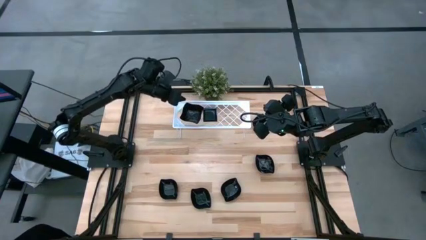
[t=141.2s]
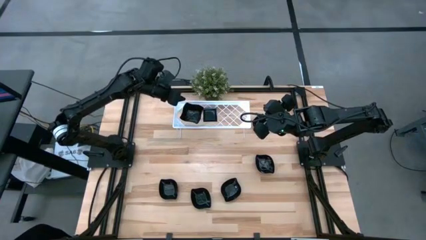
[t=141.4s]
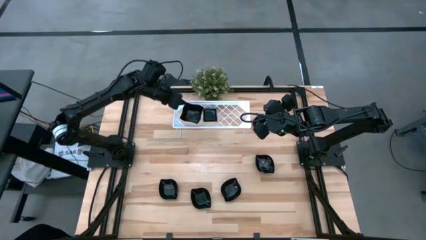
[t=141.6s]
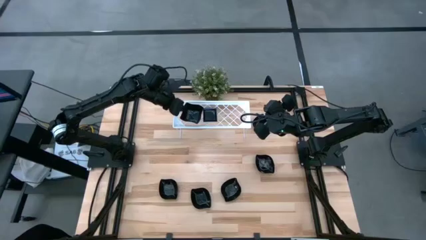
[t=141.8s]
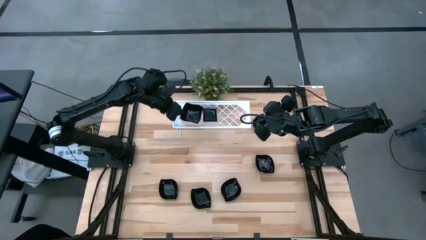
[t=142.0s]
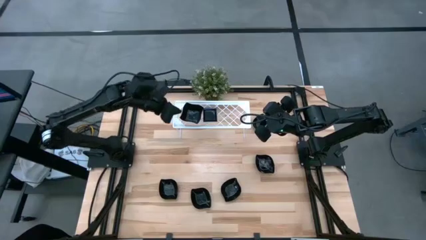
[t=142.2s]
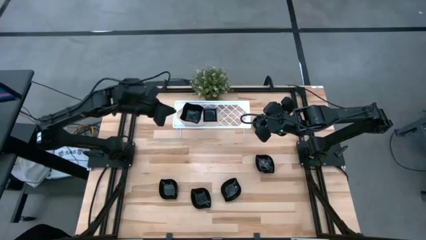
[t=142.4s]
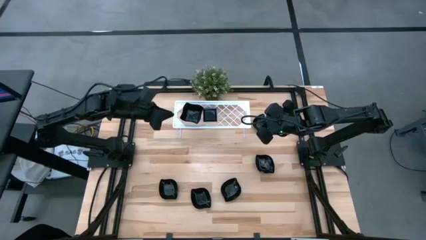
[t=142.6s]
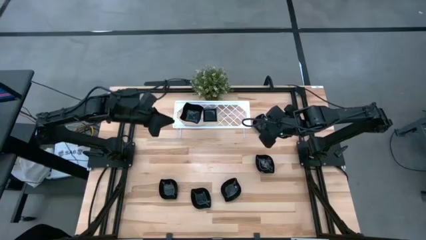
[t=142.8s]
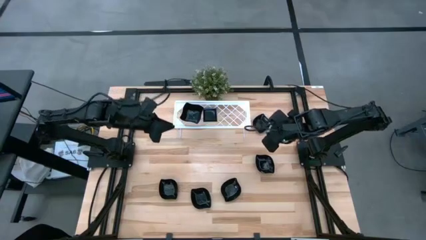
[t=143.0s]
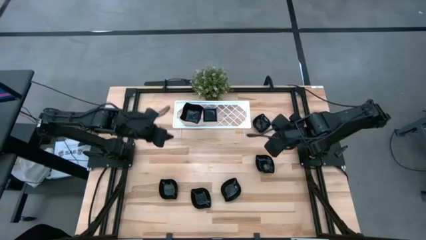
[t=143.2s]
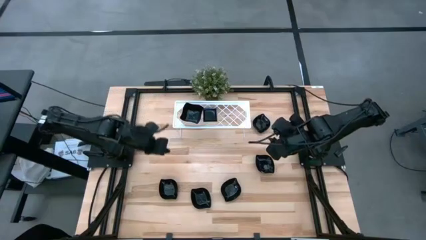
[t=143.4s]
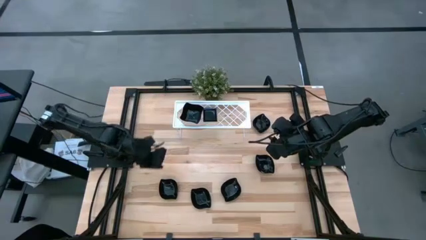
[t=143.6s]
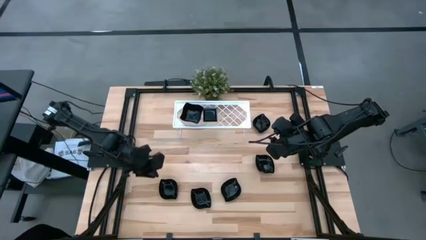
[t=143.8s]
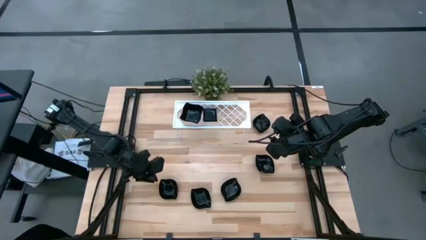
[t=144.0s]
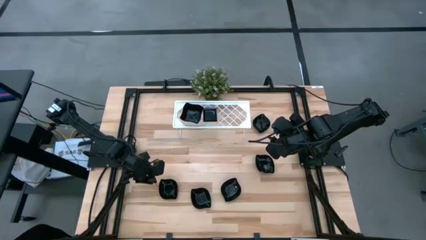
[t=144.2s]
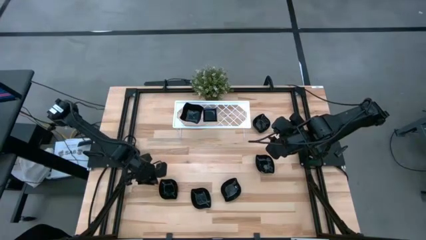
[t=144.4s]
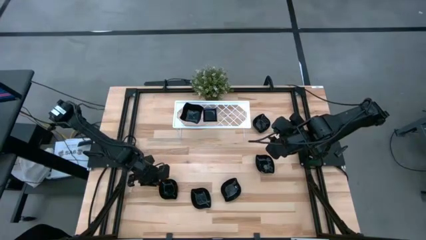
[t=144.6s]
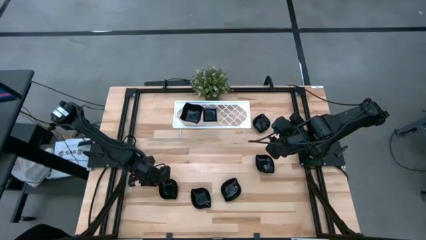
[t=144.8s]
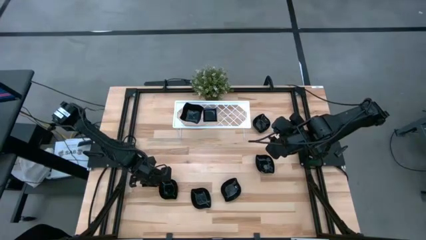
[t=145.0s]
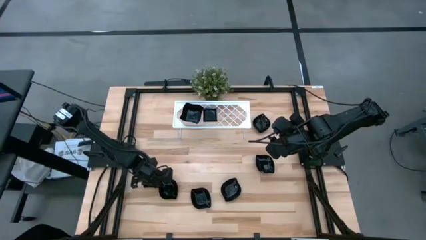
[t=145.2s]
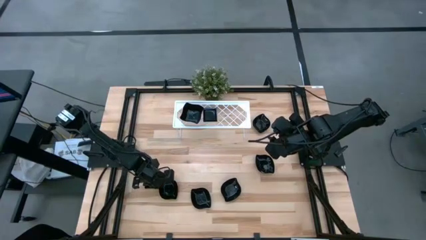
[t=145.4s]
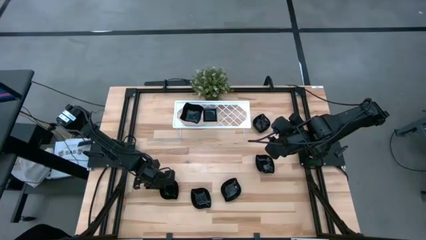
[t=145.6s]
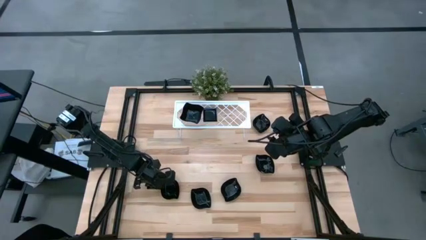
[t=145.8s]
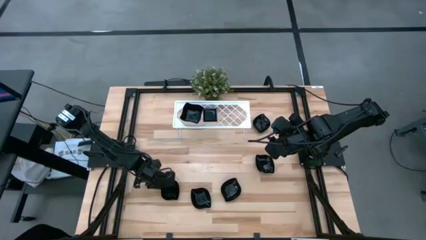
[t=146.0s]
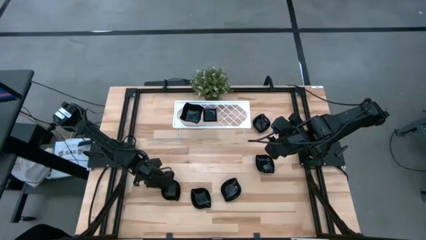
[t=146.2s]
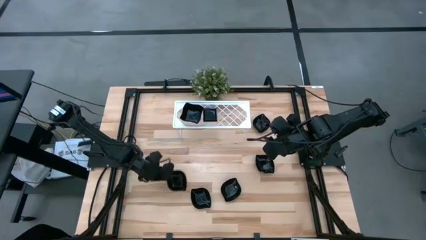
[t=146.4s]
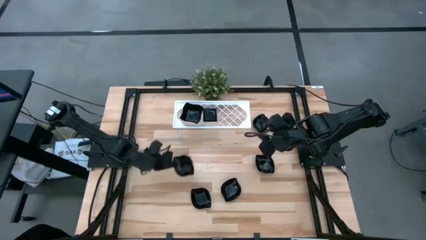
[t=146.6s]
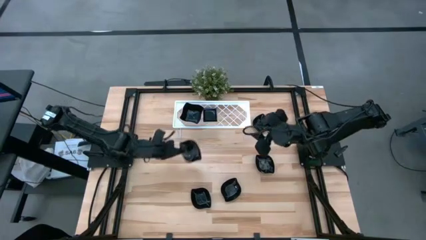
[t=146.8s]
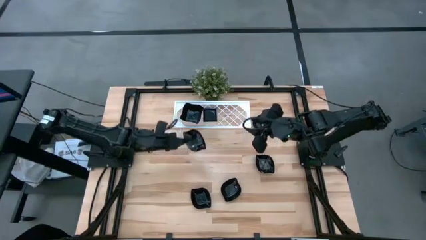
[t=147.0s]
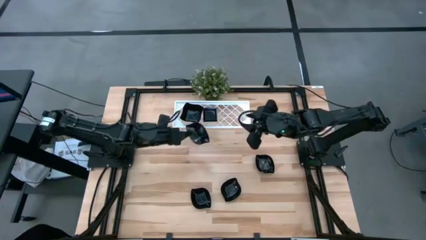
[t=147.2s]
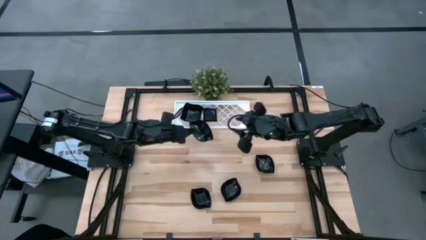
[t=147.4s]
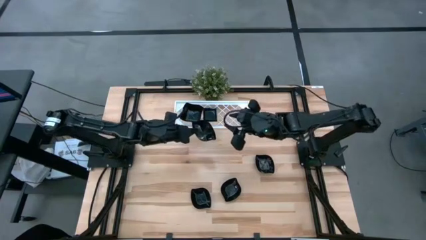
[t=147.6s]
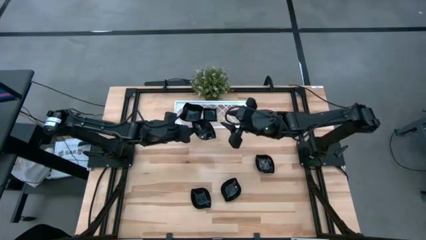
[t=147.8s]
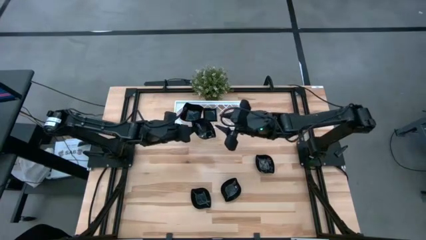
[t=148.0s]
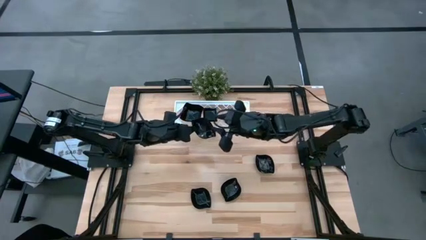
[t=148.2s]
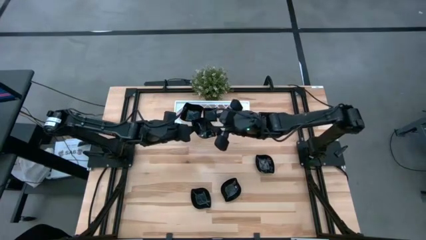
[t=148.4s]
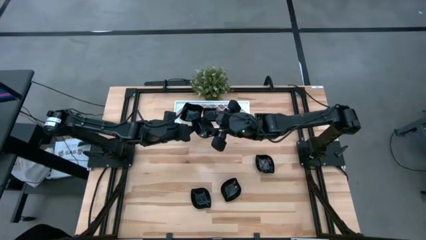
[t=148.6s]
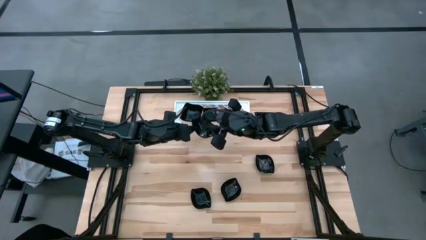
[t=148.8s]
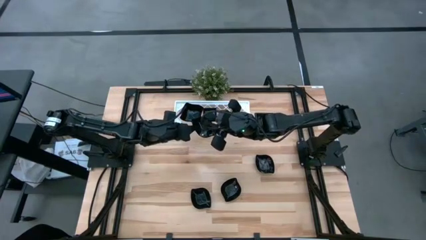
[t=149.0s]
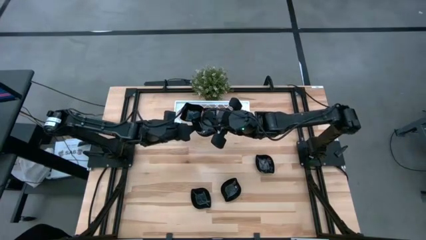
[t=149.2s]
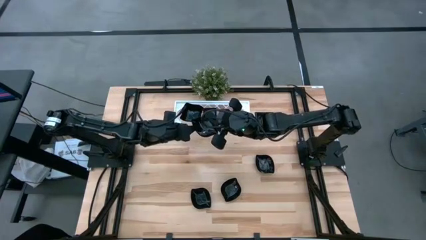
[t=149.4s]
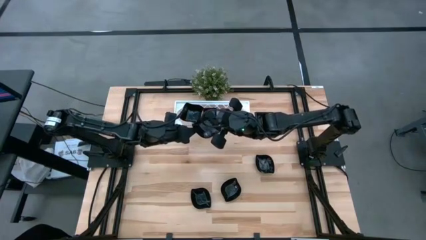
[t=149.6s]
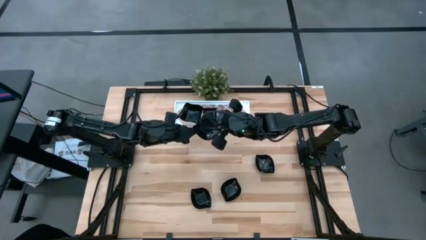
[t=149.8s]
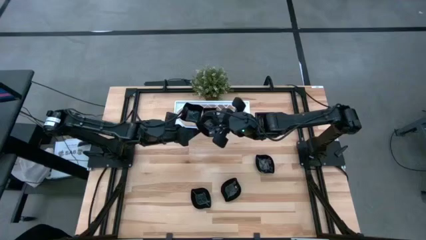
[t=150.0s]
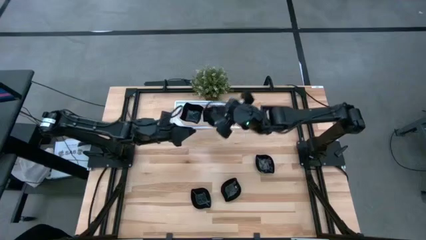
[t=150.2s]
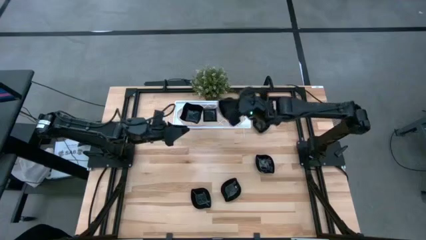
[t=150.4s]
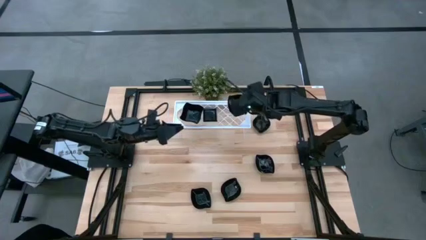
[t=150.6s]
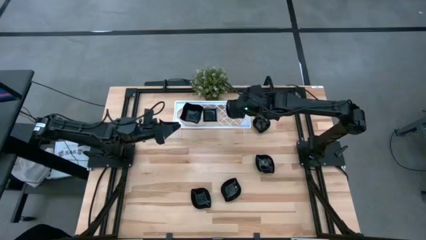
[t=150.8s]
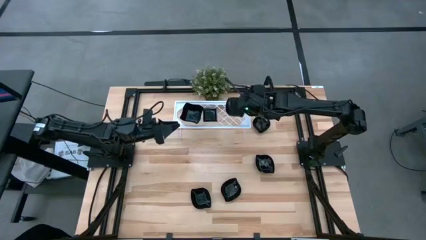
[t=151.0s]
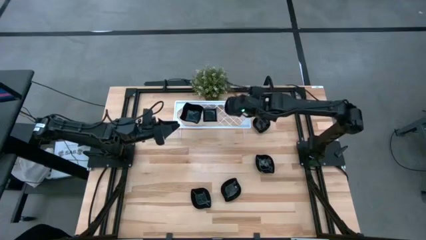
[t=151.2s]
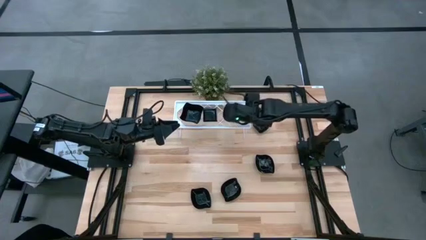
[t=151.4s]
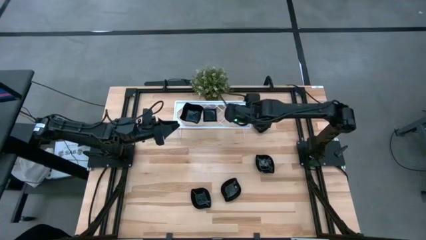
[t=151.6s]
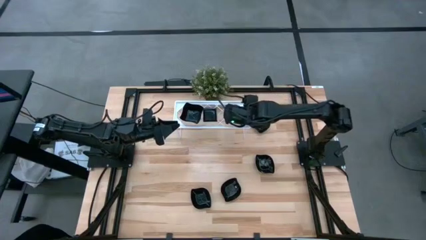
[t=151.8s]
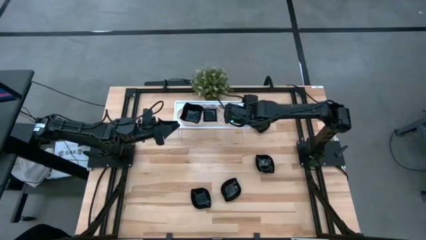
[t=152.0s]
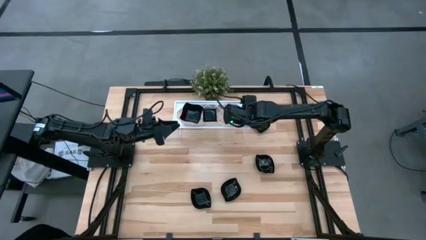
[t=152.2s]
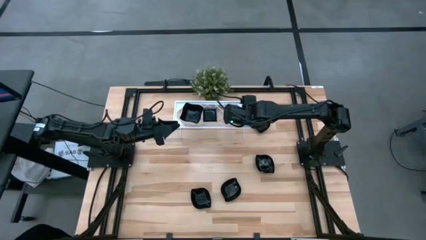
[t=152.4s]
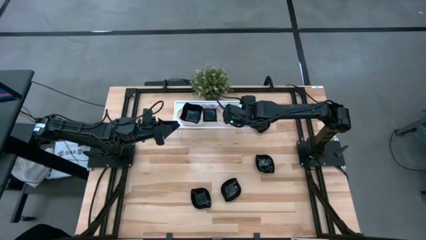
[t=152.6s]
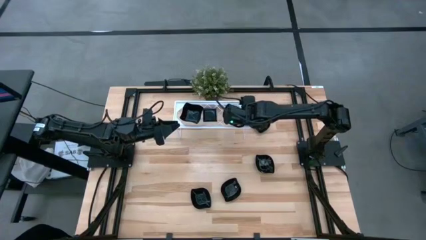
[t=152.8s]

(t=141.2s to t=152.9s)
Task: Pick & Place Mini shaped plates
Put the leaf shaped plate on the shelf

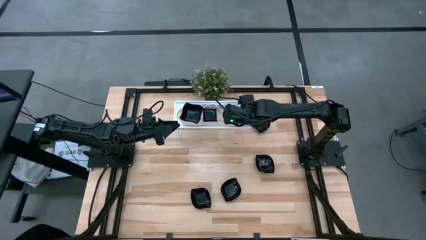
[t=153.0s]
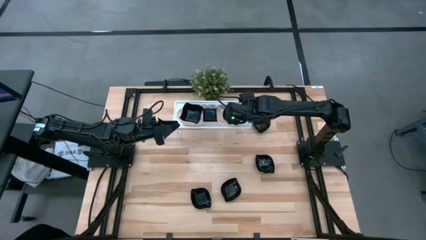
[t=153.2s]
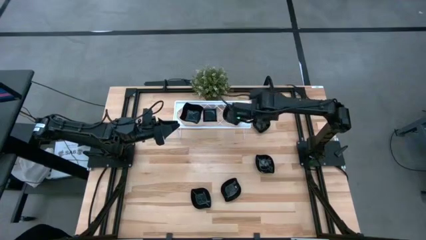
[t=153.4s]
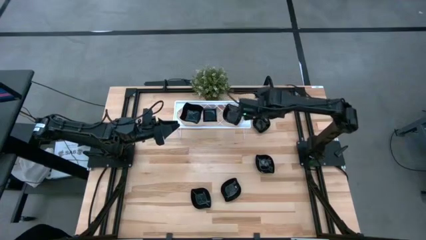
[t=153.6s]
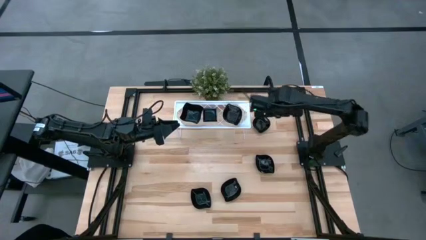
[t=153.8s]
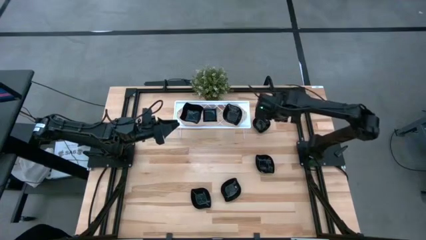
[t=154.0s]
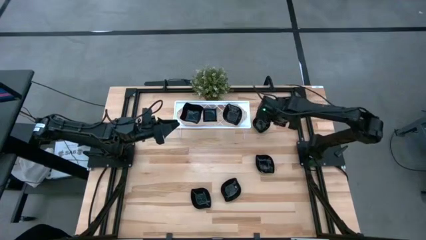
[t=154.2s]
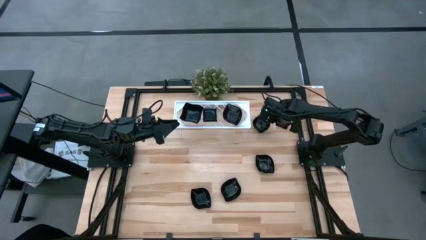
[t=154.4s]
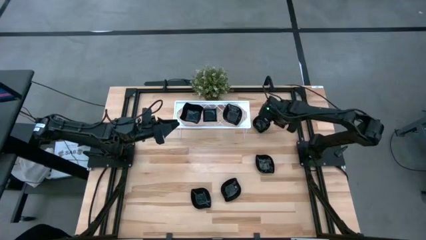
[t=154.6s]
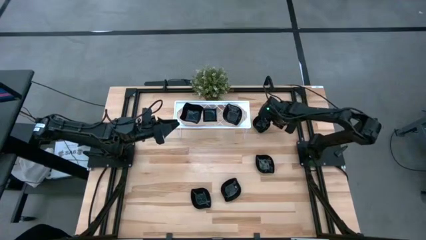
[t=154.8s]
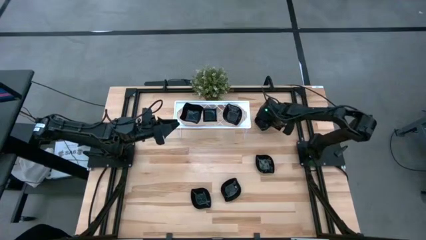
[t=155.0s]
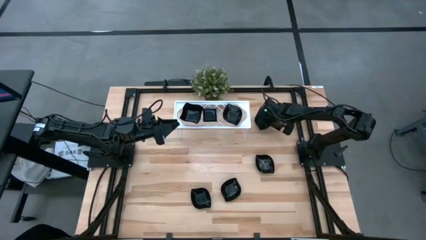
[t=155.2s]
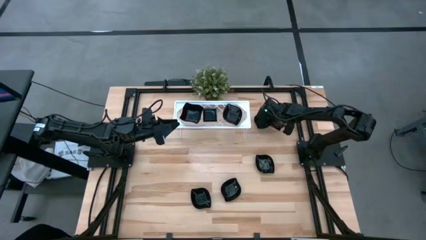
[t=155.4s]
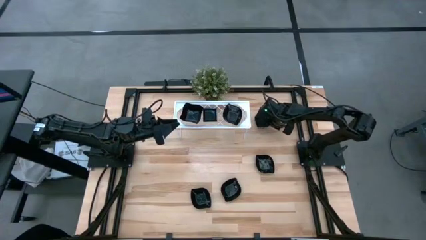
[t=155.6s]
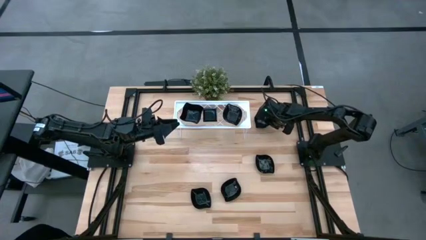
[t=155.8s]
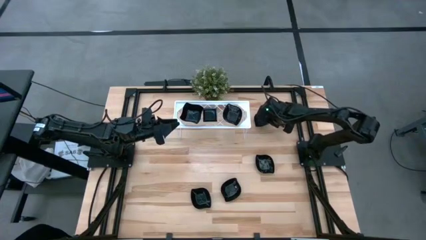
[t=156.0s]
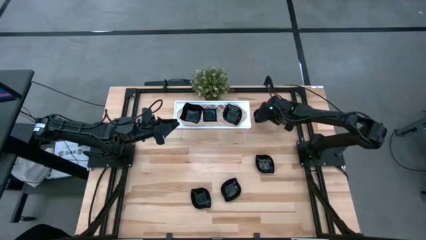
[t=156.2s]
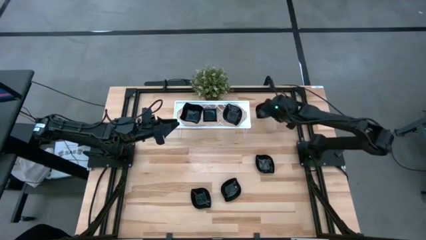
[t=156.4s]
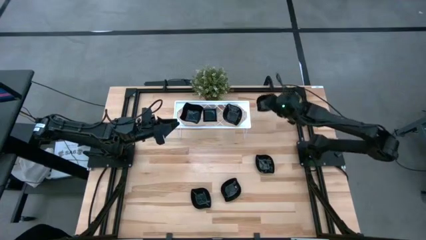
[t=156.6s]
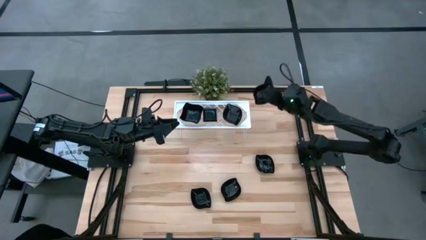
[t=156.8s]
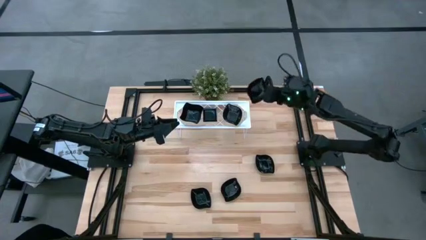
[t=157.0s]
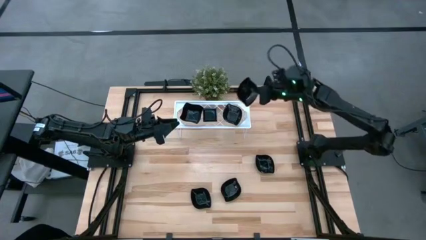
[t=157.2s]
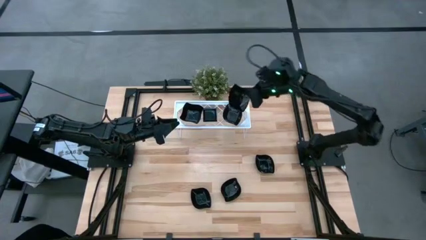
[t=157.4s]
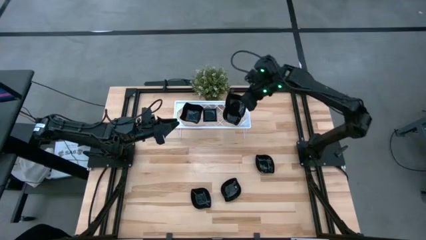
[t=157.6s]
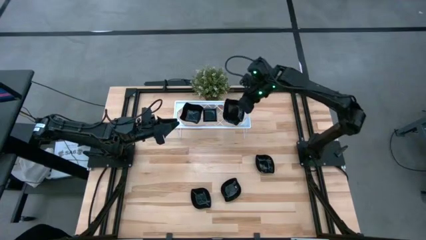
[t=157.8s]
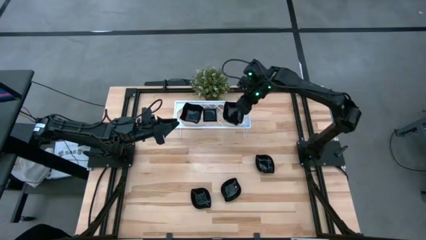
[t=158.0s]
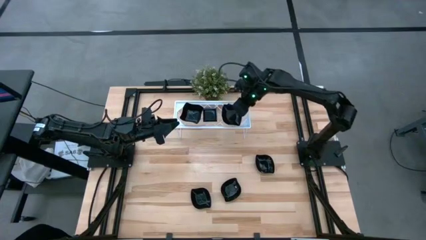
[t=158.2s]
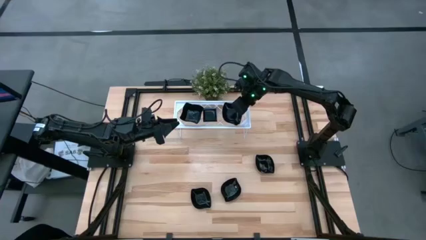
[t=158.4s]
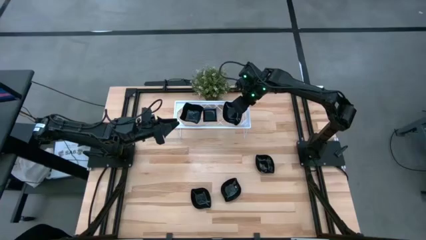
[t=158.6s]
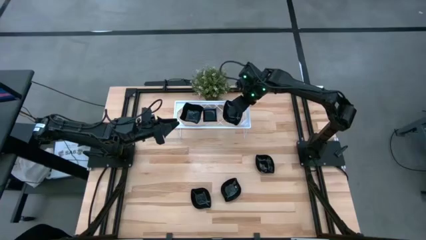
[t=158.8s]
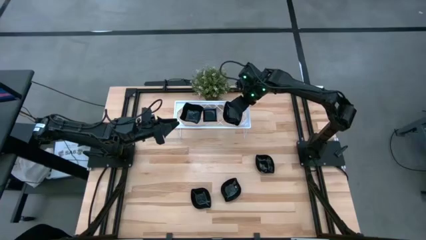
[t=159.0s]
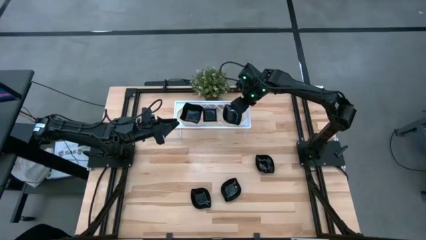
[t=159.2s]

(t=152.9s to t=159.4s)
Stack the leaf shaped plate on top of the leaf shaped plate on the shelf
